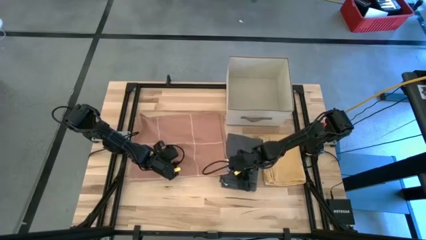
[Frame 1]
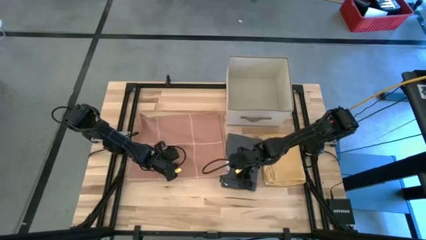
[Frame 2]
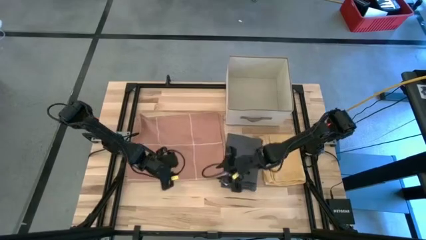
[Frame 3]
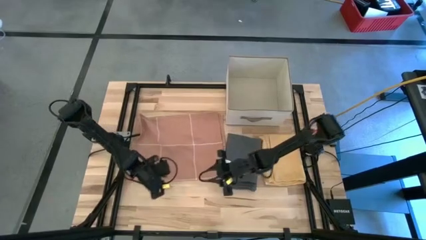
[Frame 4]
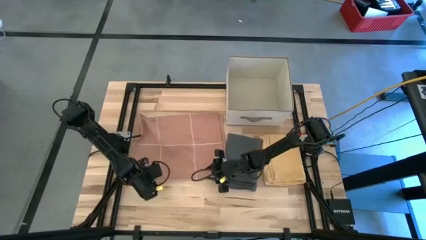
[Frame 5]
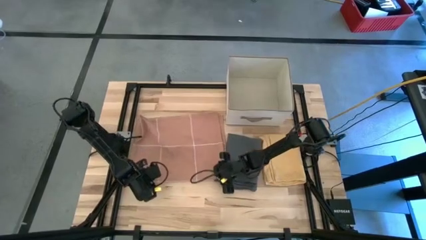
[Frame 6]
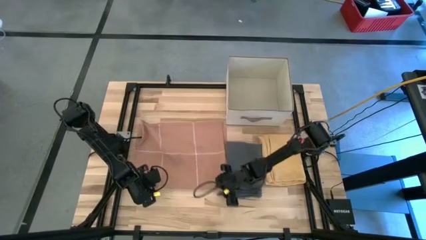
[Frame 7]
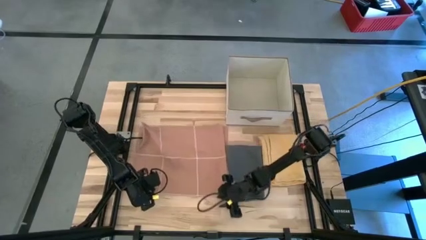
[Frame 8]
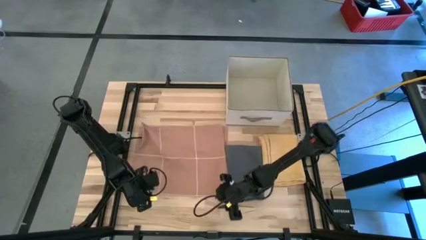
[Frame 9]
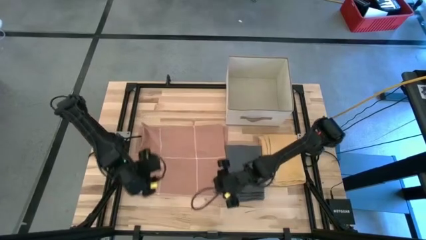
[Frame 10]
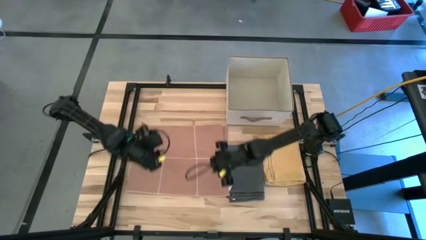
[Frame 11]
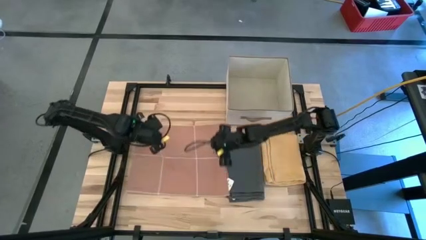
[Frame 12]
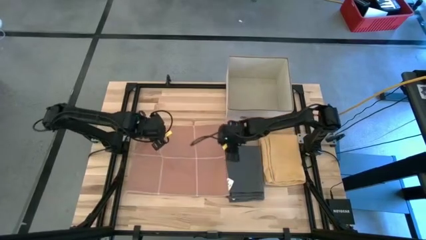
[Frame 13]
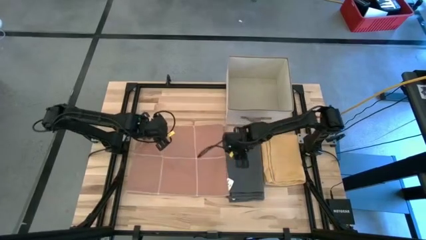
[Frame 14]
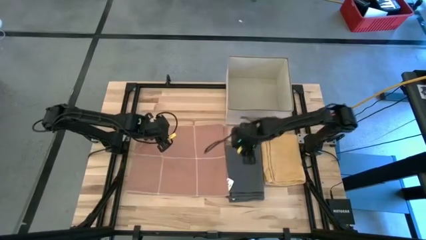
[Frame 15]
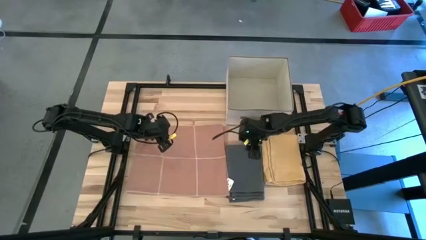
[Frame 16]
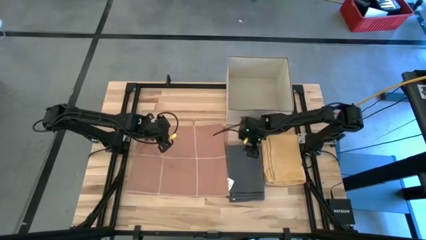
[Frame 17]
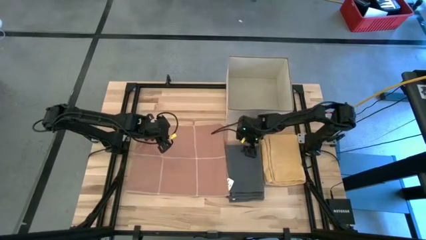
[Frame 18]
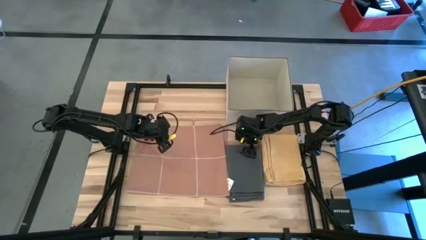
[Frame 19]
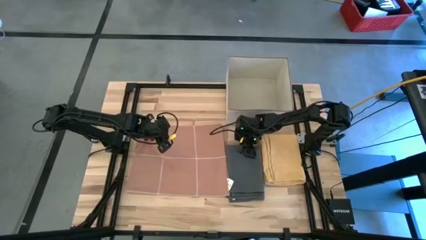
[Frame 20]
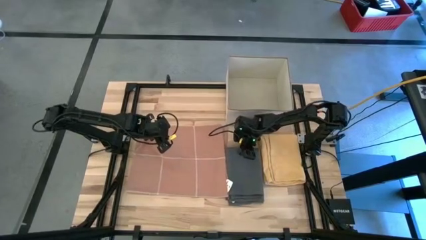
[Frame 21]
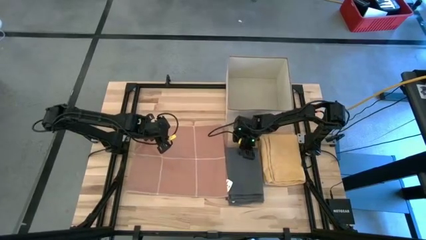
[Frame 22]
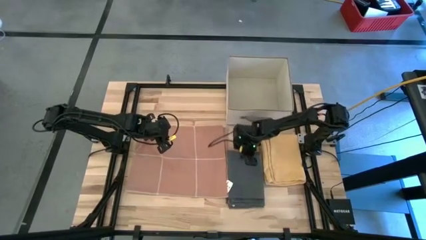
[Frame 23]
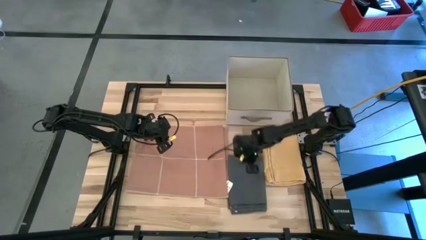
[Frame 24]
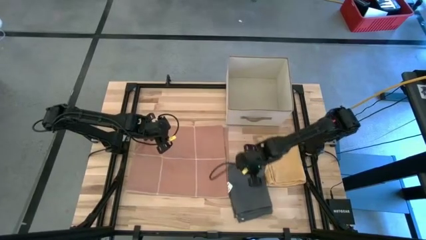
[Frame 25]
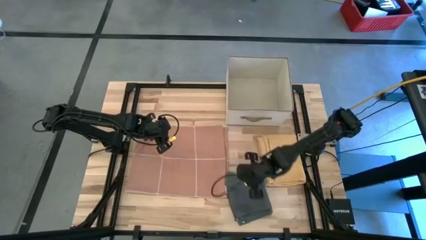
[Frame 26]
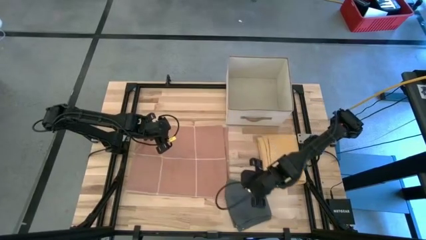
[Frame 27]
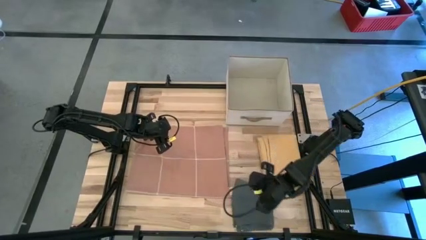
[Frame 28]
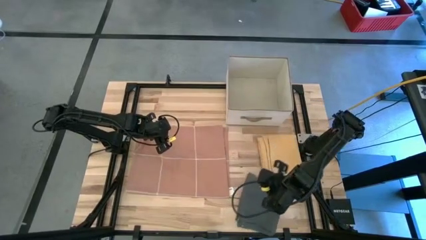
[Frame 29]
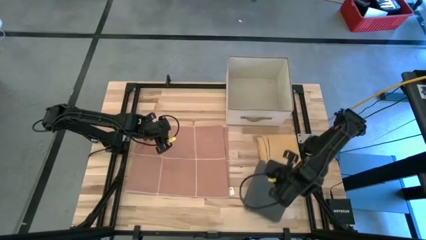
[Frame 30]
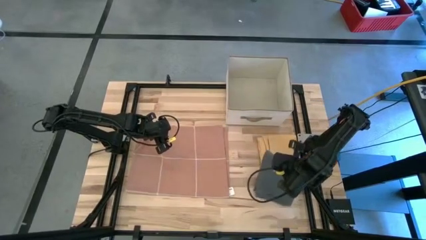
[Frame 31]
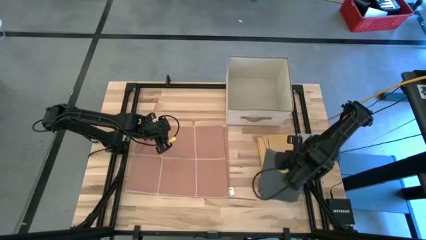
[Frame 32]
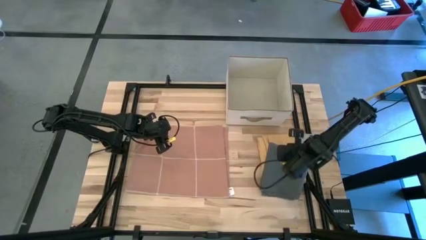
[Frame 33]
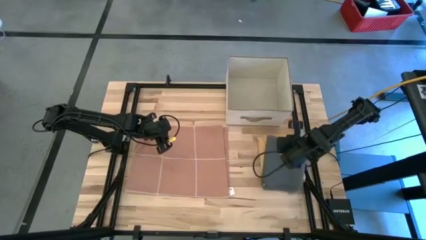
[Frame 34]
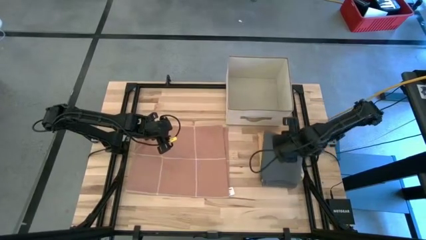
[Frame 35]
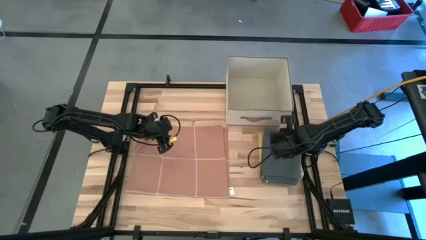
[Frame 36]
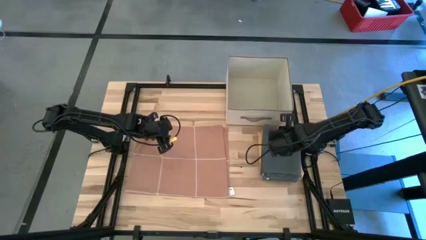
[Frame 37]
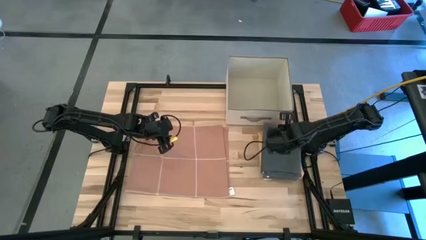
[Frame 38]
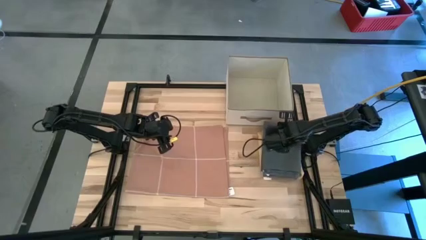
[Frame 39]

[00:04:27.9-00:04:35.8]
Task: Fold towel
Stack the gray towel on the yellow towel

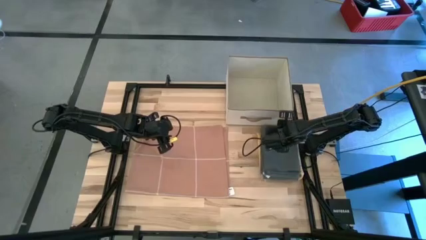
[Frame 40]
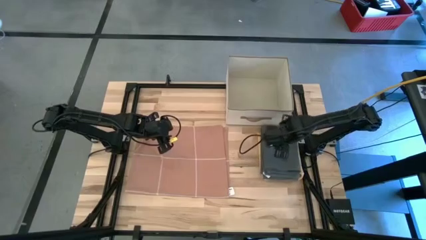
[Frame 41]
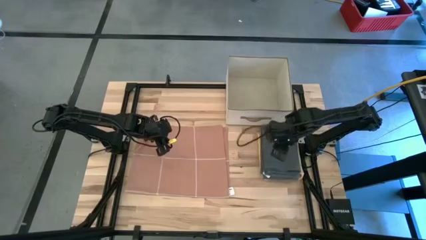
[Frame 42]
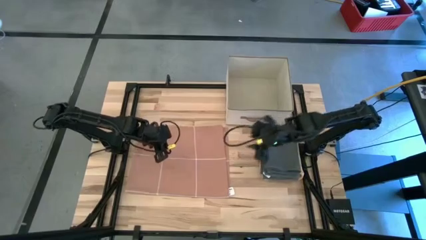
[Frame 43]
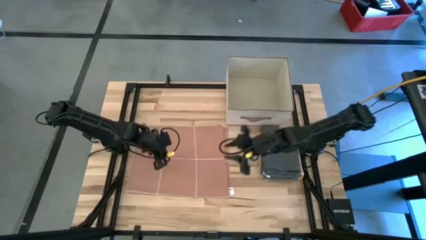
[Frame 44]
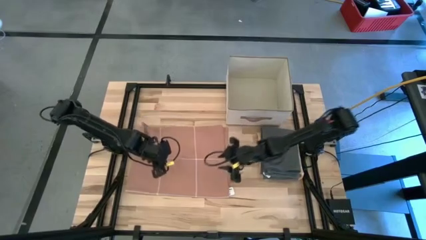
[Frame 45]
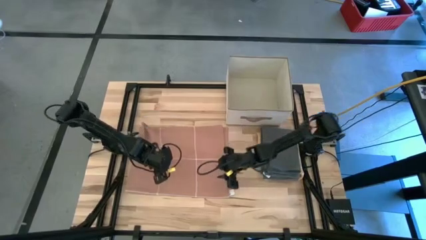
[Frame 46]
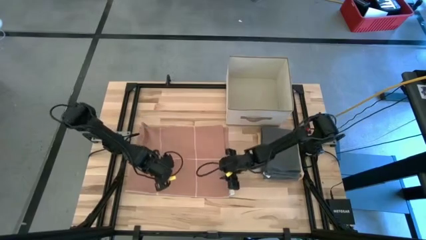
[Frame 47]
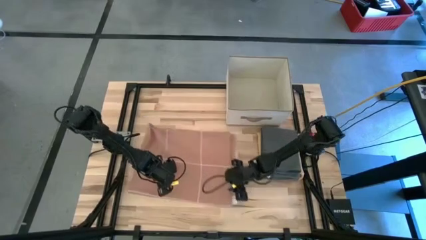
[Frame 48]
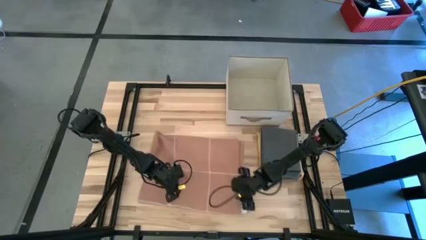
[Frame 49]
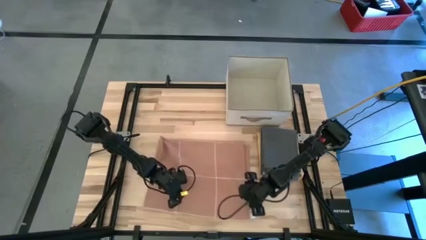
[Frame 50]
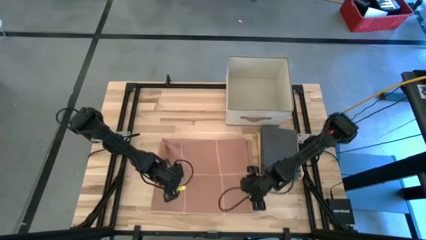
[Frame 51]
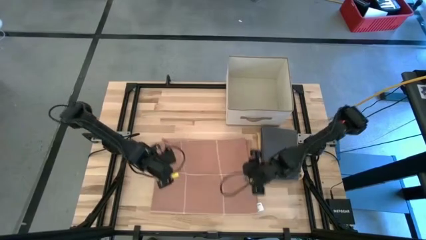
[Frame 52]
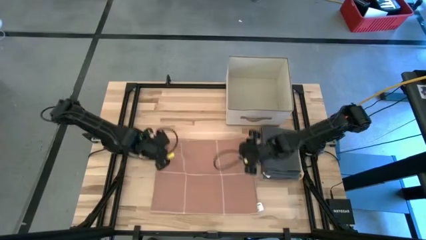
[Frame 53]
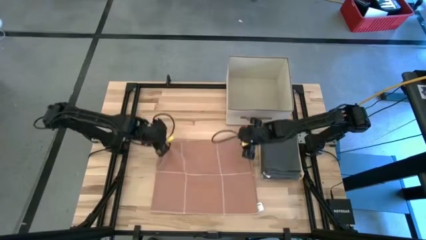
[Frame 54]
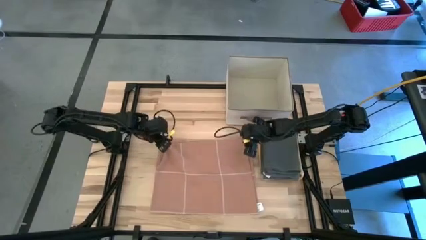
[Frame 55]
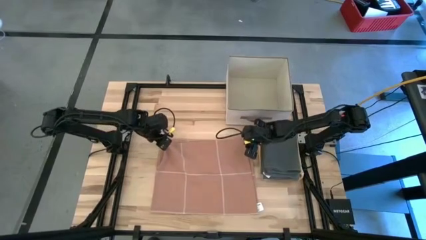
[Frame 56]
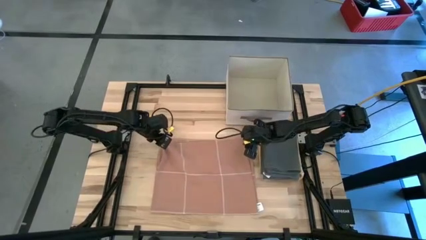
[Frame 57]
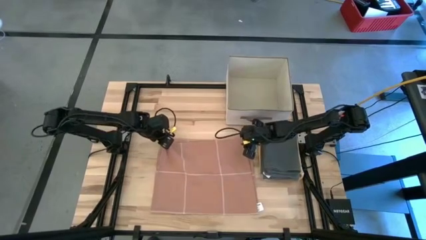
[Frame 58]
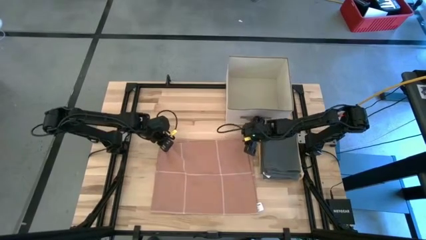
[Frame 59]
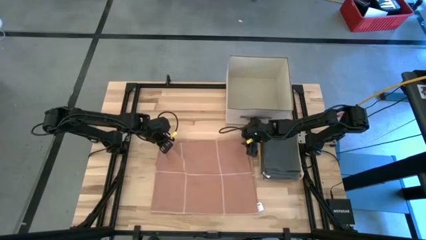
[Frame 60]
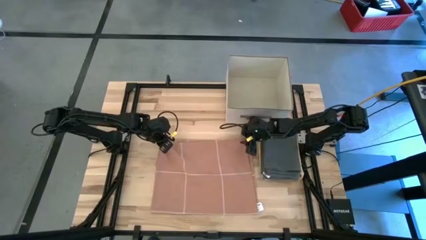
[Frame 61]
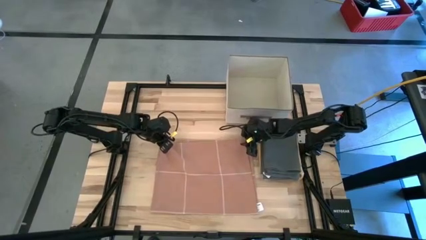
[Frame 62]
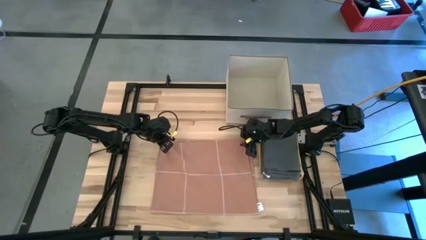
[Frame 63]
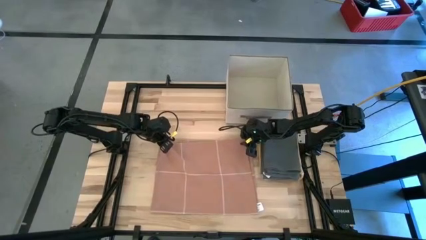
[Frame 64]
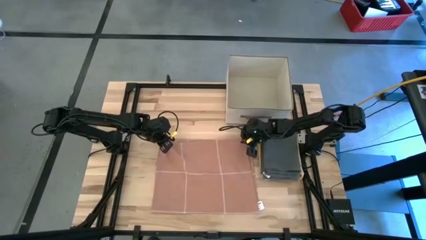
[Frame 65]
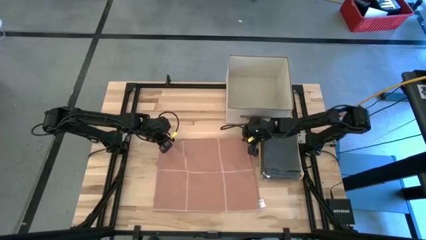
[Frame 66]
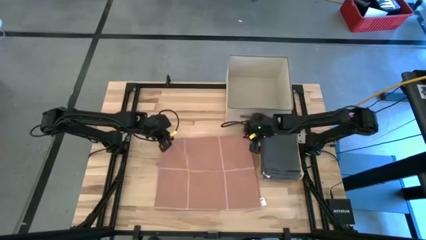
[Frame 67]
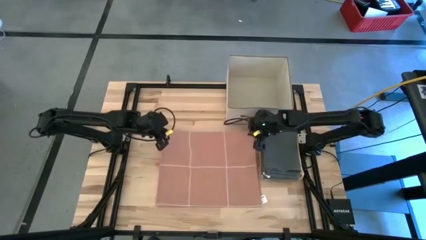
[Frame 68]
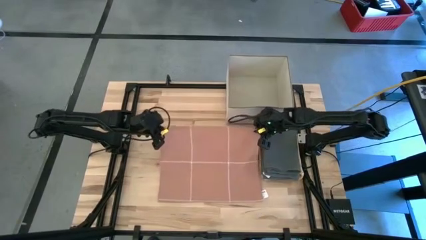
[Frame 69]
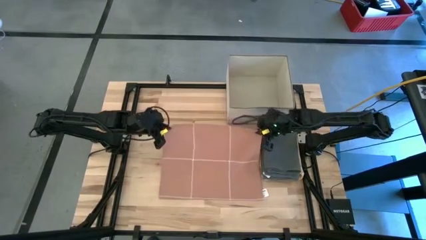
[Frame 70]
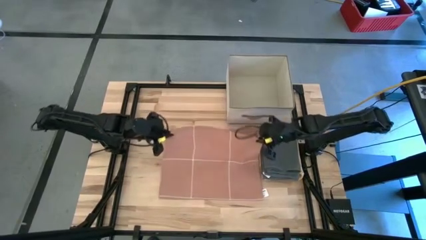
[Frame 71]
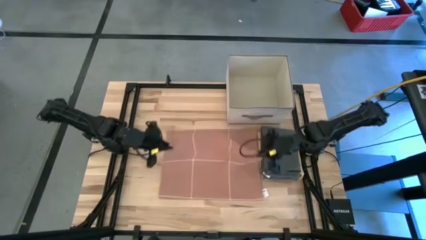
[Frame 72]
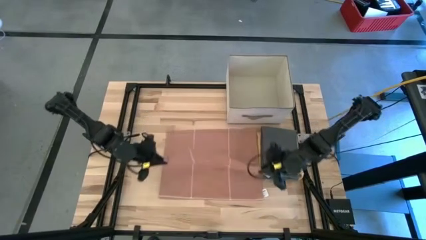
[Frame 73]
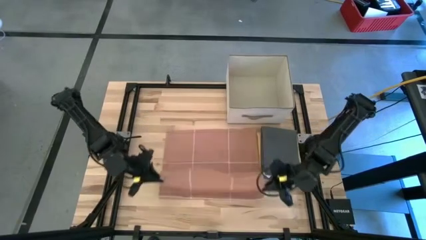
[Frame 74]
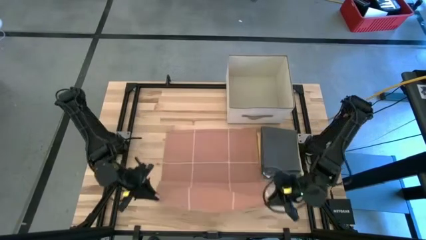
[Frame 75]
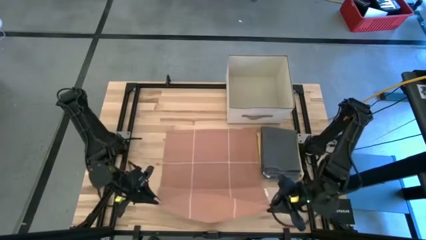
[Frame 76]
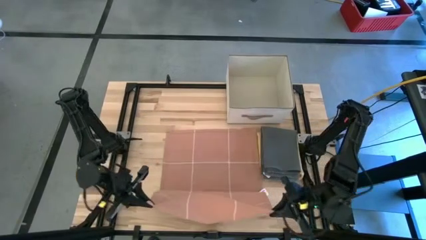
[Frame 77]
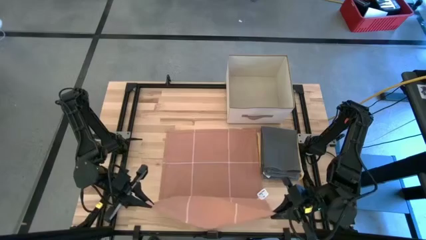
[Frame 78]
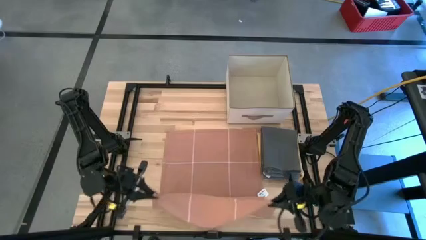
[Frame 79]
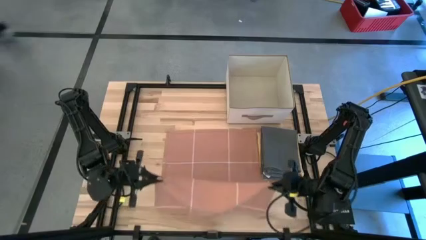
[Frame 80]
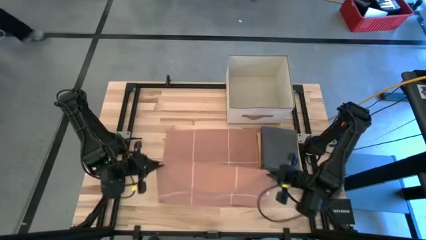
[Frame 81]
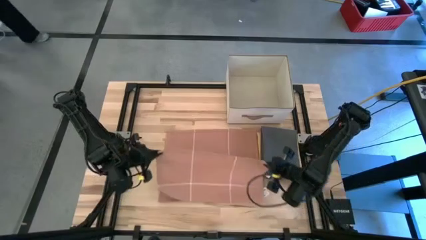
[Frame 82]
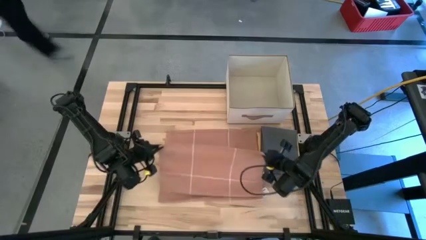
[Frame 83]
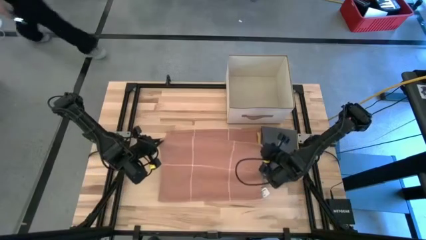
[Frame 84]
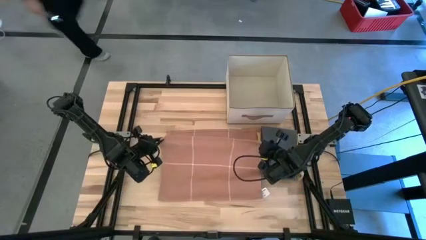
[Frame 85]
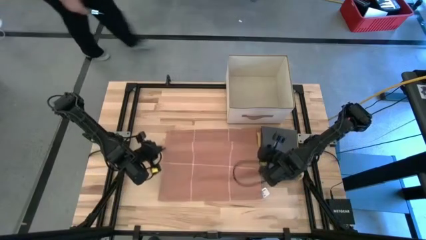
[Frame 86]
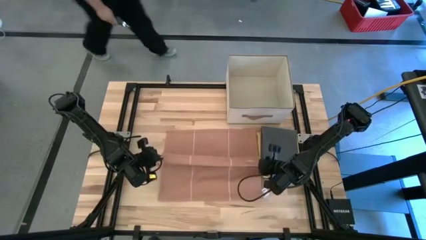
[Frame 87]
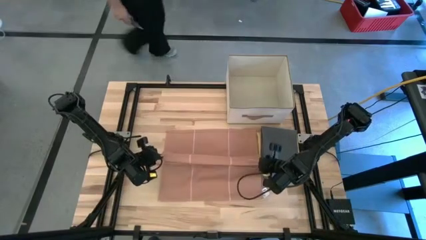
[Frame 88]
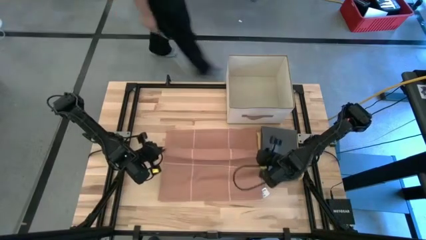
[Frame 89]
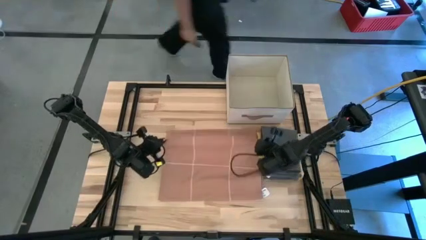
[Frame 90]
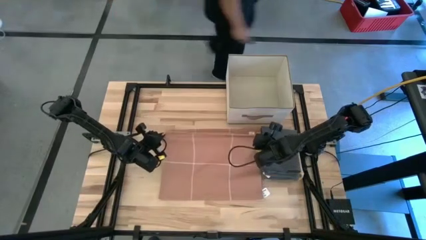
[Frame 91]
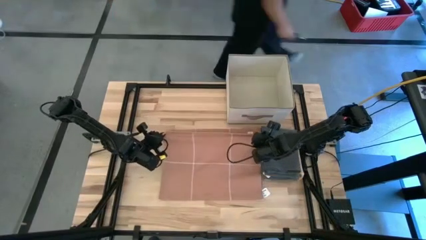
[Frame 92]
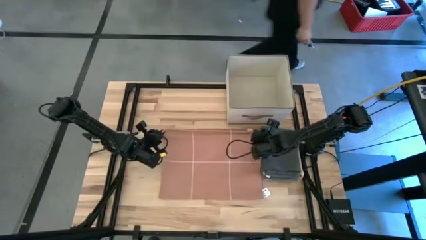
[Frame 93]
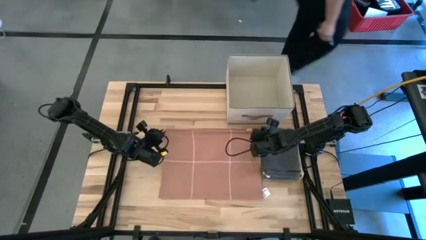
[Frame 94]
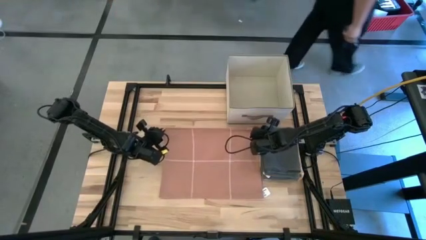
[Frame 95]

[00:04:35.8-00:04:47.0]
Fold the brown towel
